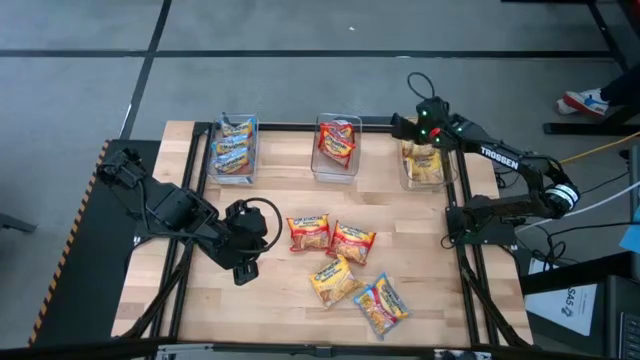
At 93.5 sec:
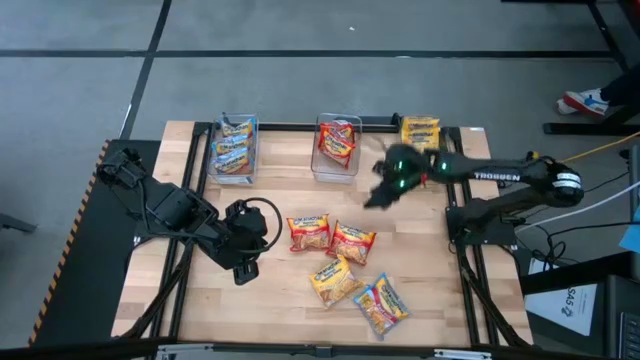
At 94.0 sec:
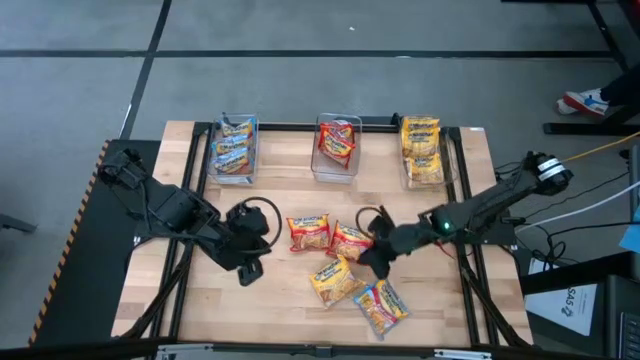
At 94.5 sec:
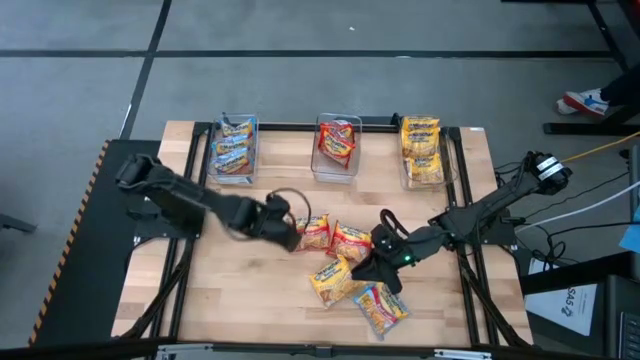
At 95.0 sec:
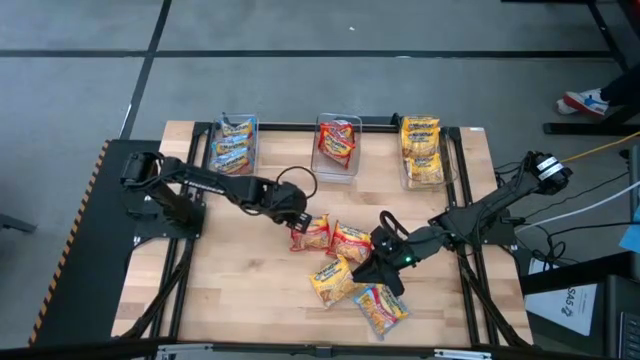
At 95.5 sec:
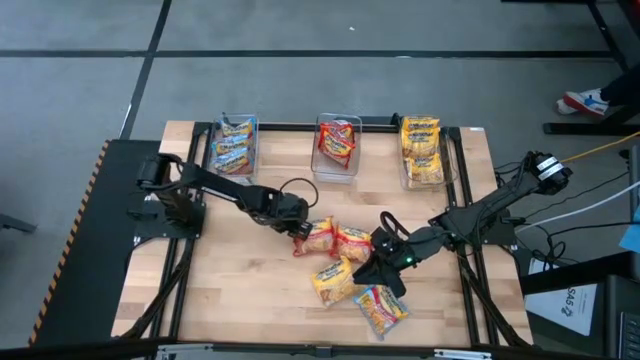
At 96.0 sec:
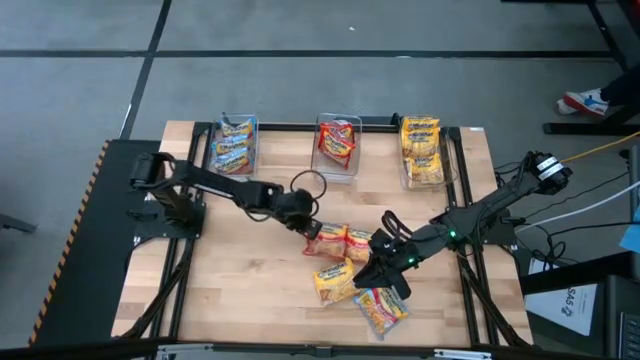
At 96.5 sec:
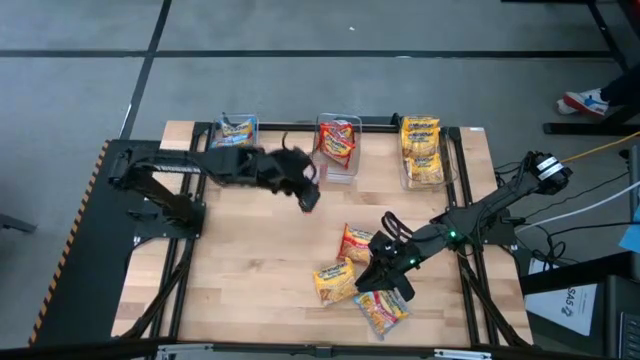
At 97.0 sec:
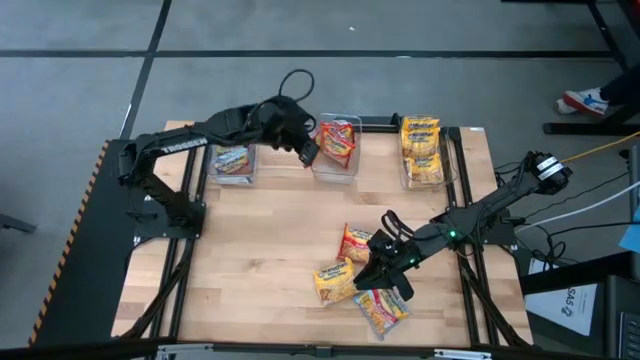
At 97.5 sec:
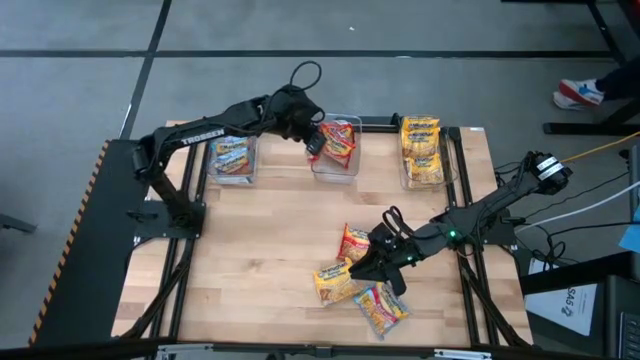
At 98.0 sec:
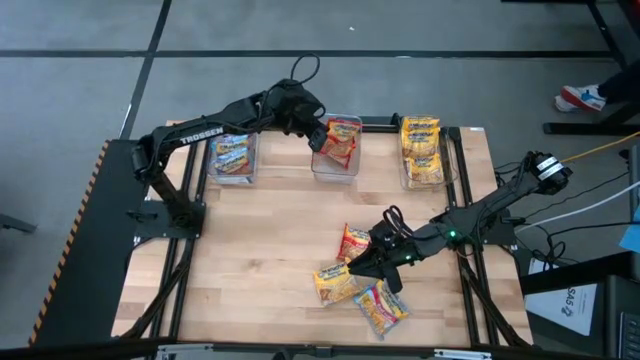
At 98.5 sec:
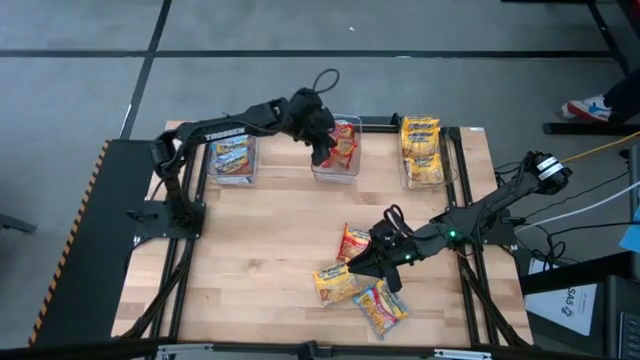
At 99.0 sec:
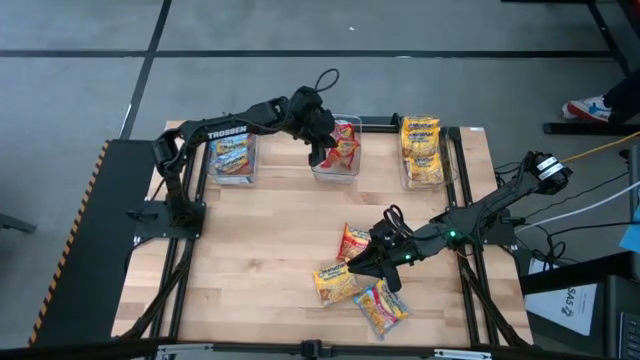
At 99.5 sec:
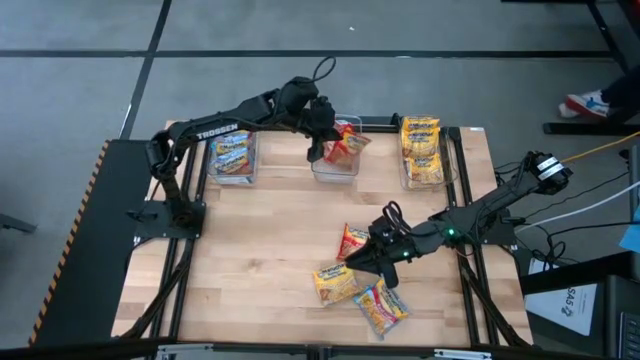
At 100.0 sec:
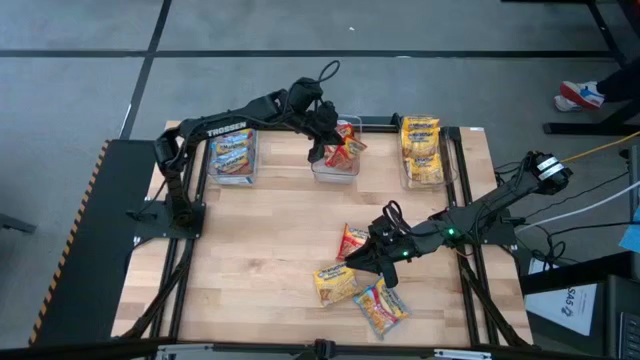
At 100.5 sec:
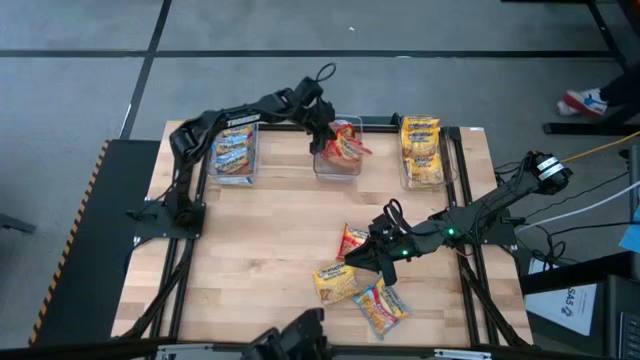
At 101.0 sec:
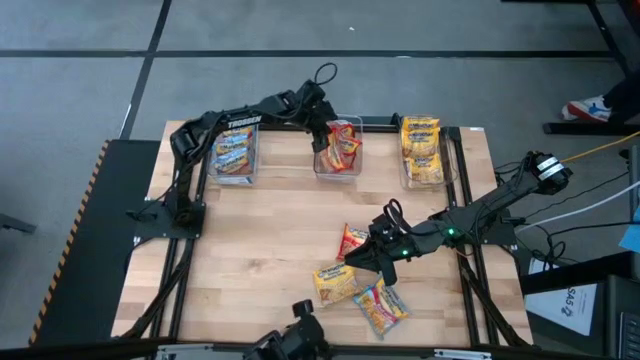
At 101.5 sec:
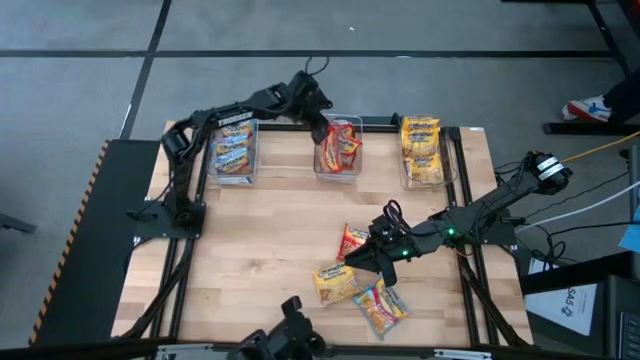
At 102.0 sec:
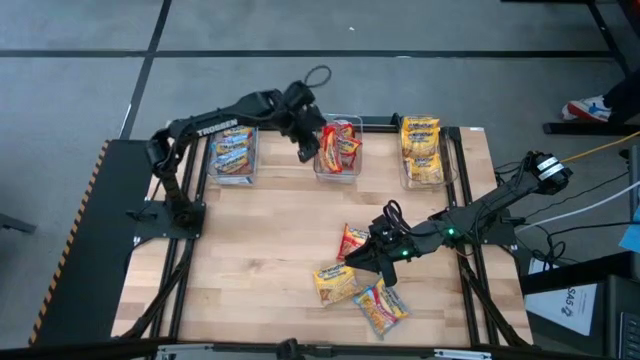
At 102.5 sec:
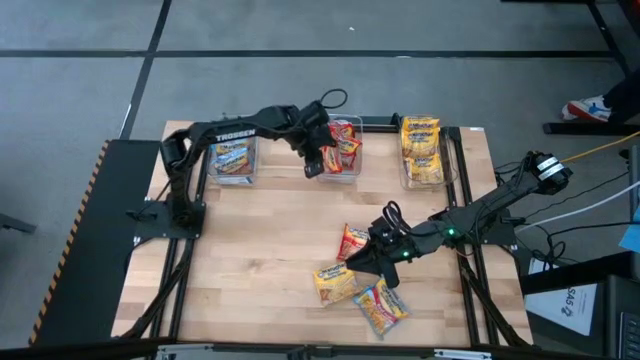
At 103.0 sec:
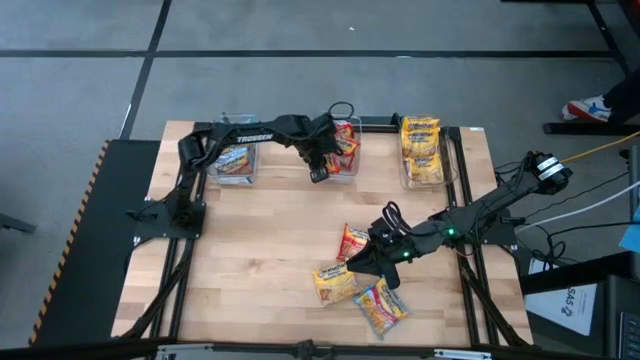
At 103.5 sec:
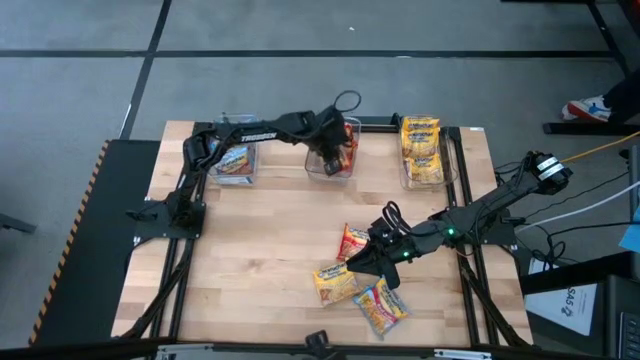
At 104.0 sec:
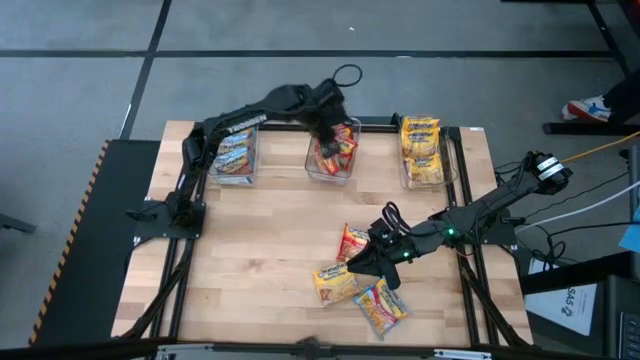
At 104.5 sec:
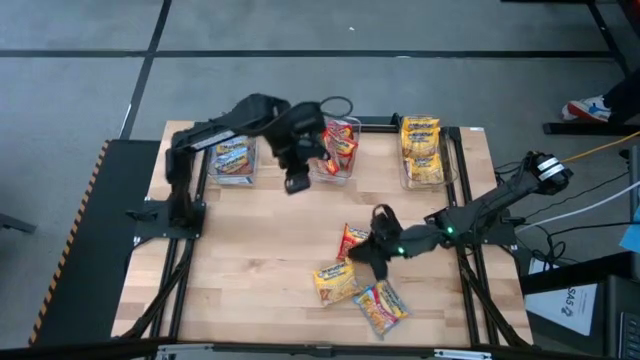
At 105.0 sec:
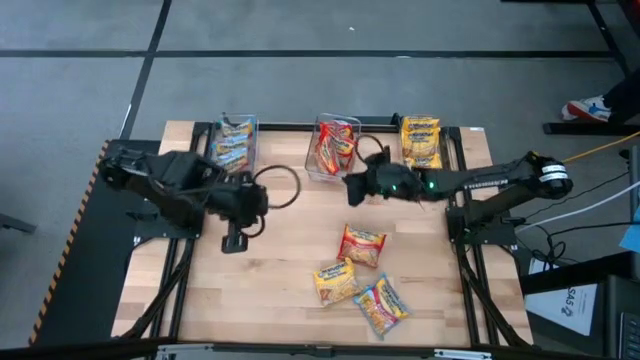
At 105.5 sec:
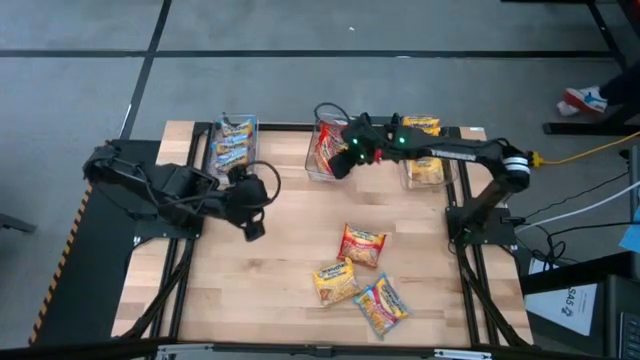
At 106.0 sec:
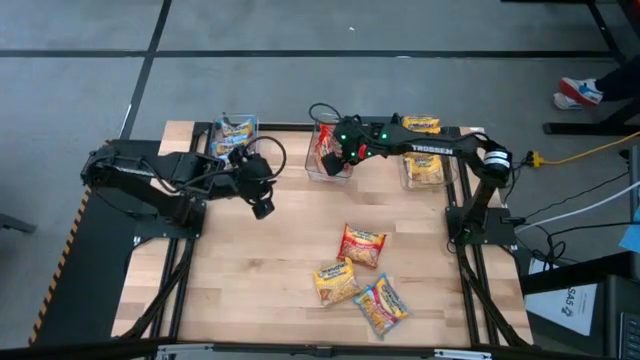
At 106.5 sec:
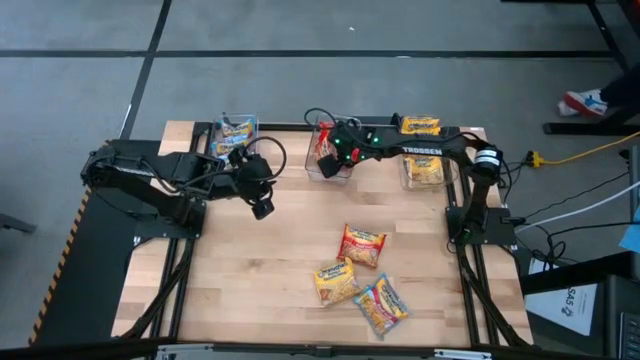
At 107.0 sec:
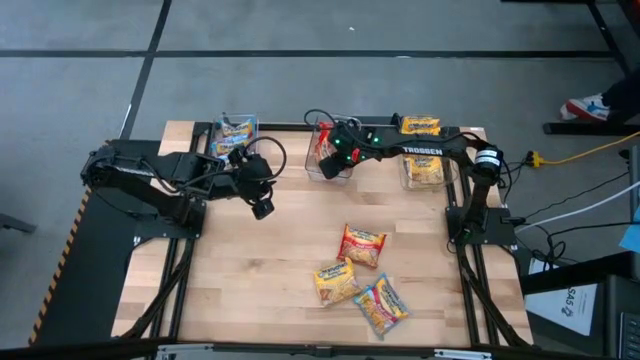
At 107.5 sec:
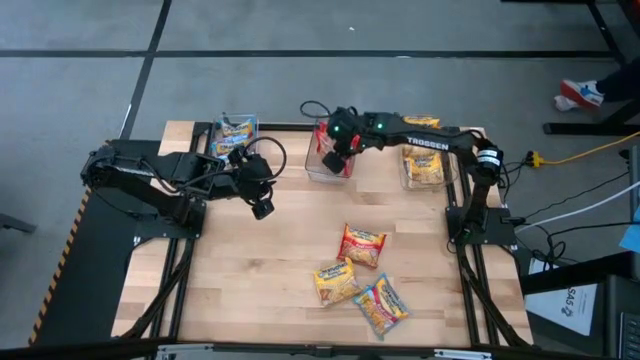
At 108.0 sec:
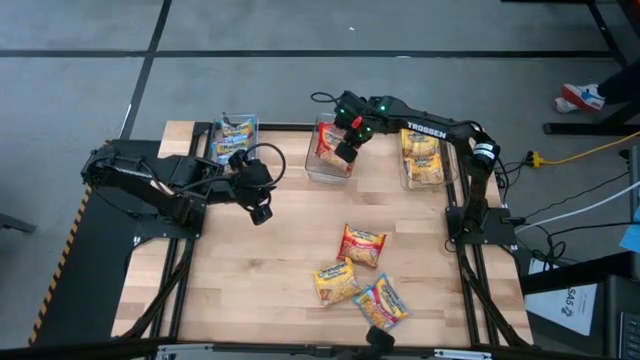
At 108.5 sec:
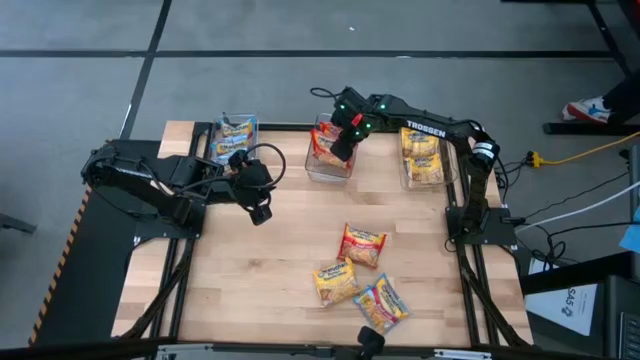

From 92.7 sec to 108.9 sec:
Task: Sort Maruchan noodles
Put the red noodle pack in the middle transparent basket

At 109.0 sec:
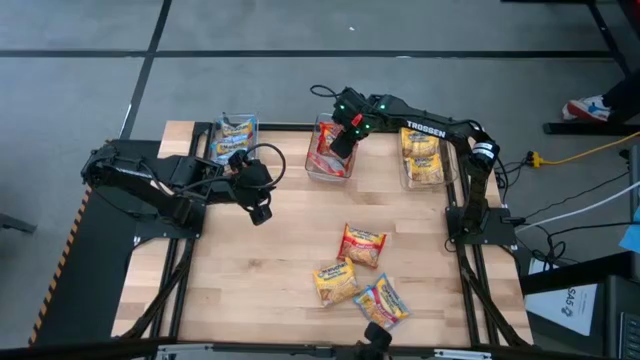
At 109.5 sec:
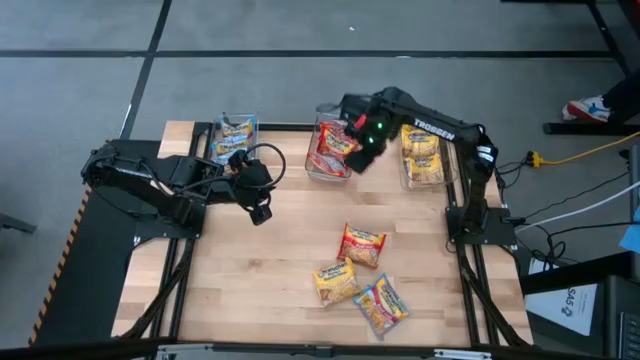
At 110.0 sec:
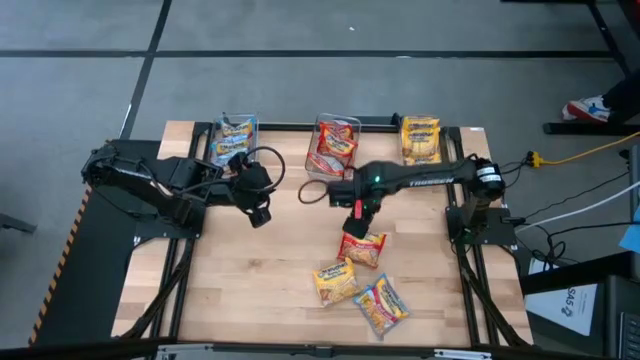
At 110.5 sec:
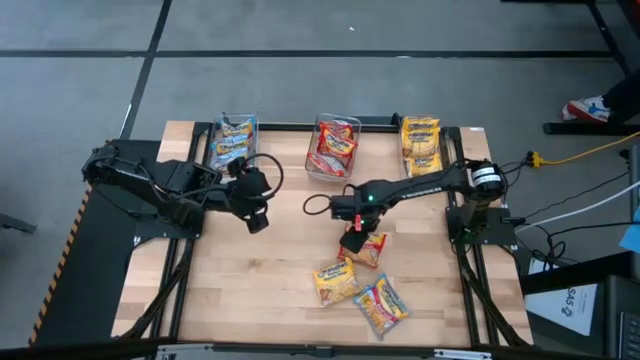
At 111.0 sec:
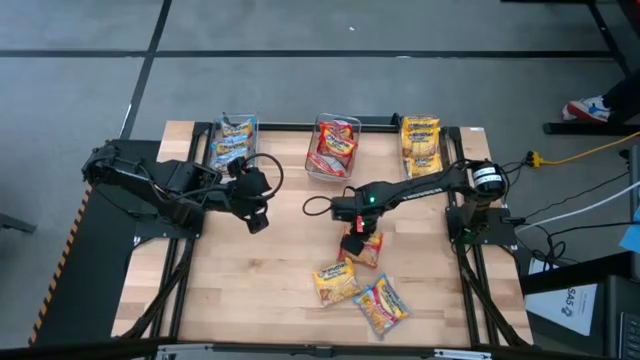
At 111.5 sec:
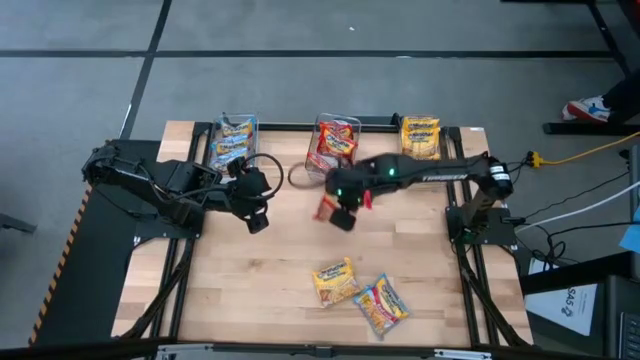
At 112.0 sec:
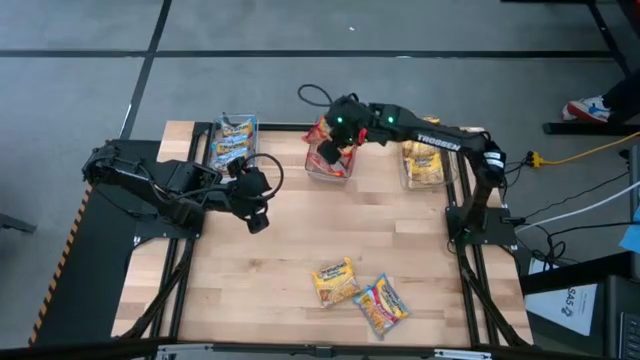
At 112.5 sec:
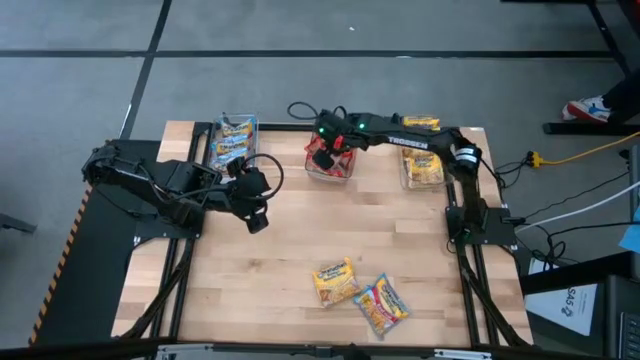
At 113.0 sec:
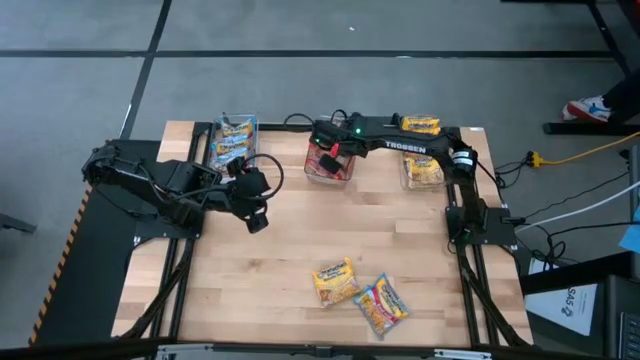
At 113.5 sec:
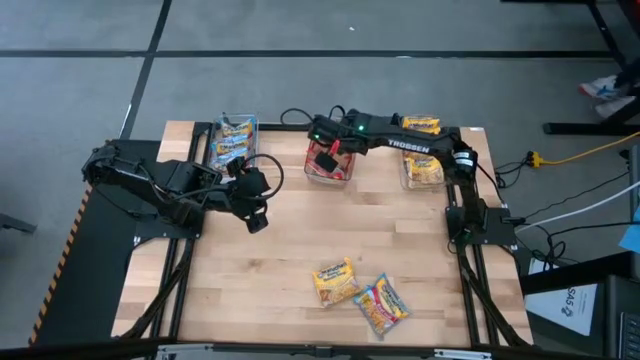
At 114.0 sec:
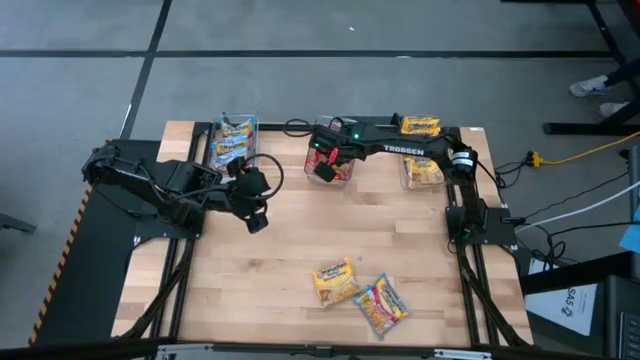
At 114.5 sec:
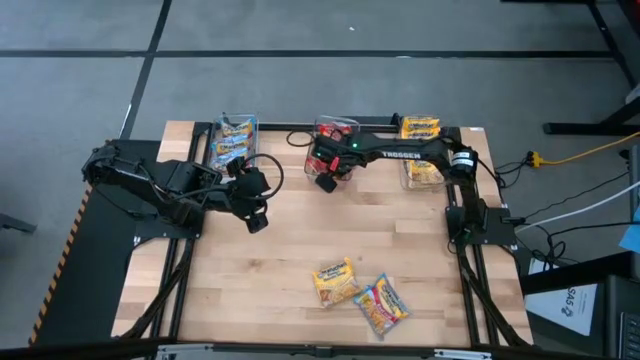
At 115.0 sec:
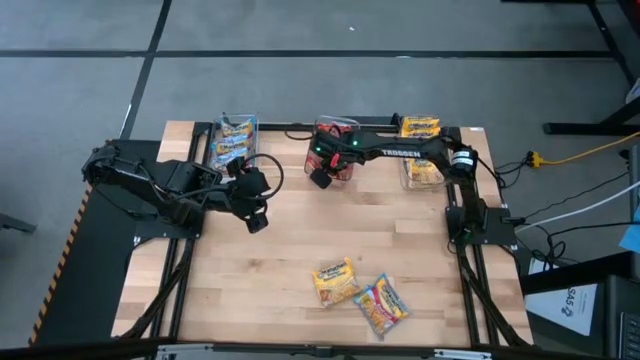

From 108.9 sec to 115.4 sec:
Put the red noodle pack in the middle transparent basket
